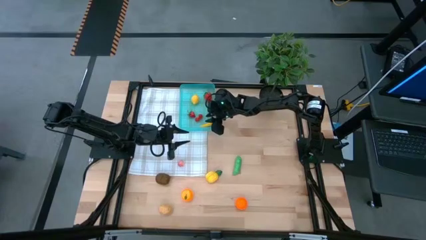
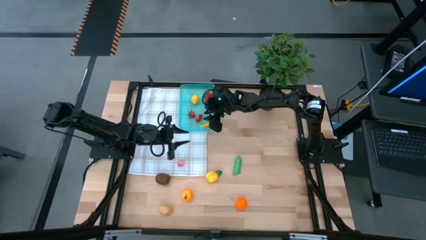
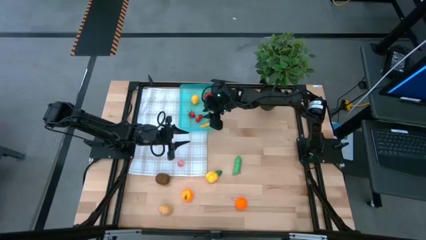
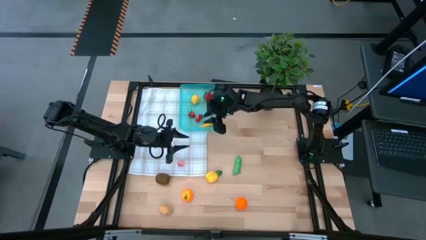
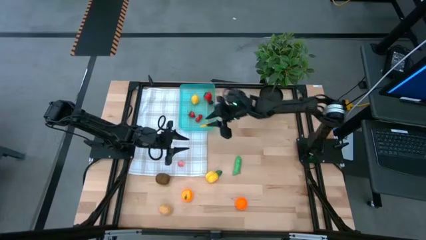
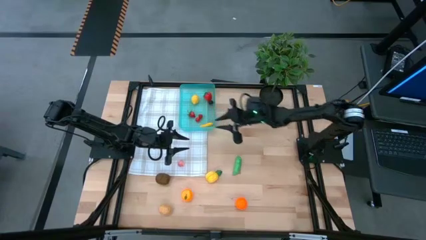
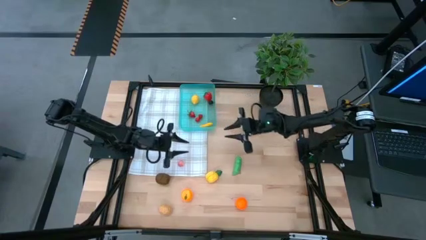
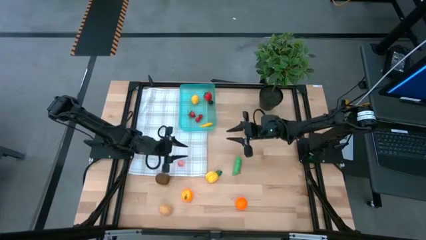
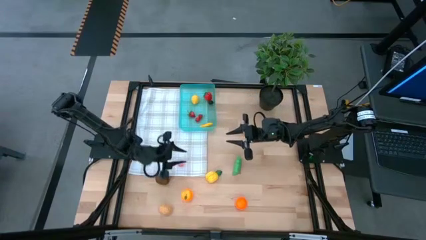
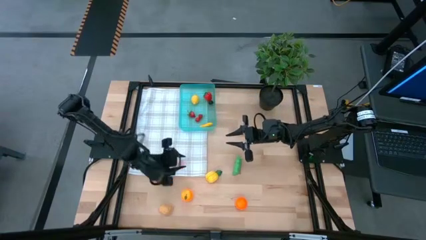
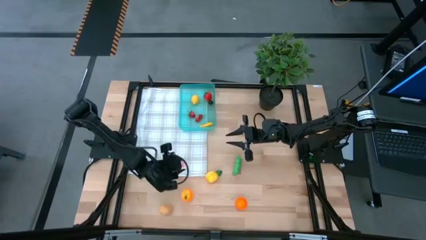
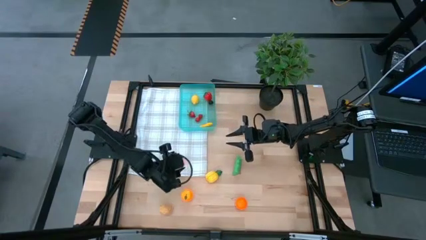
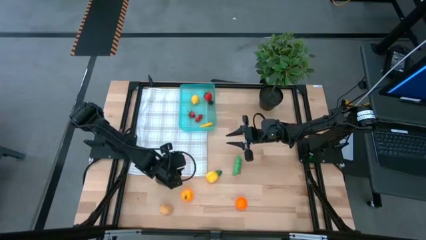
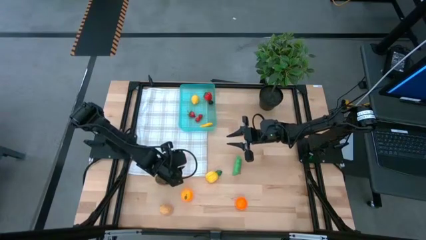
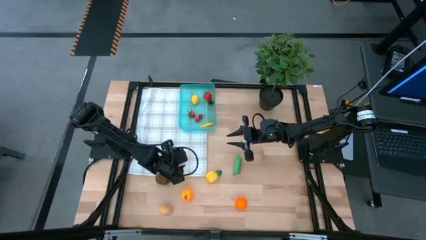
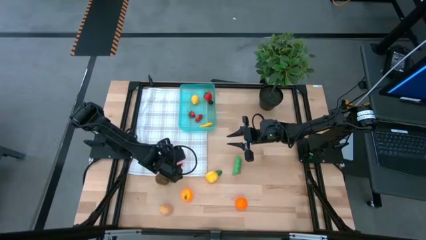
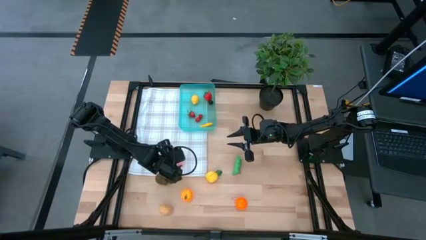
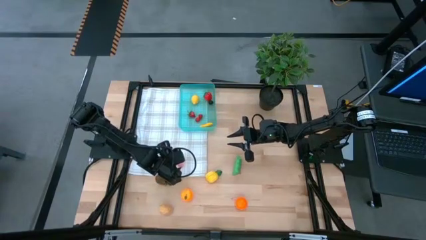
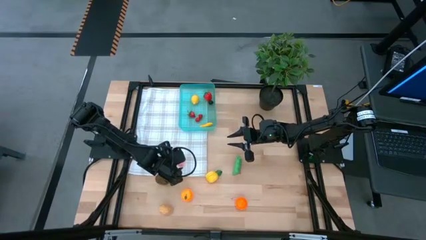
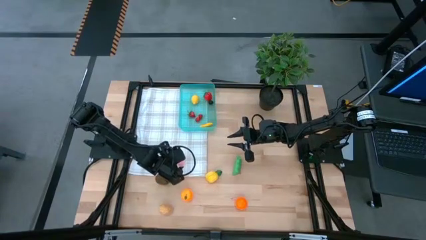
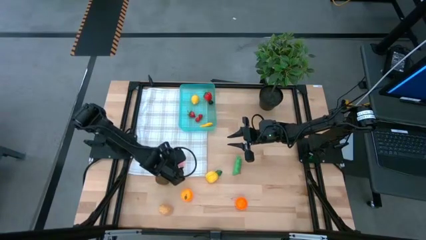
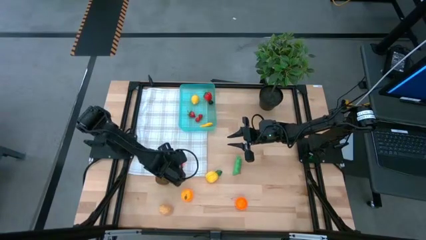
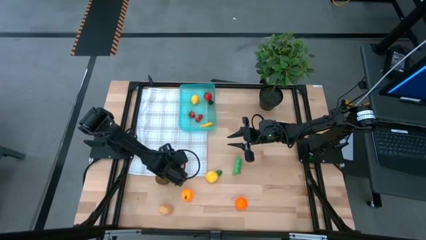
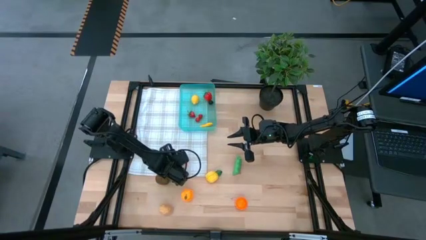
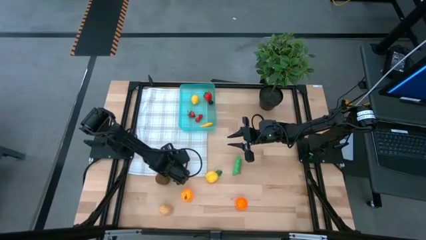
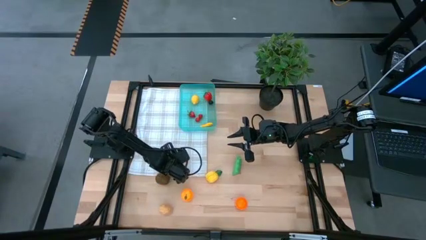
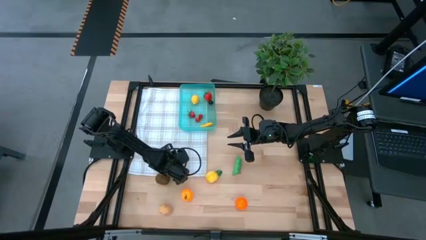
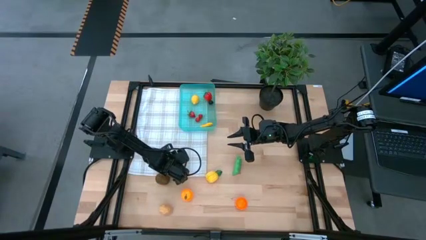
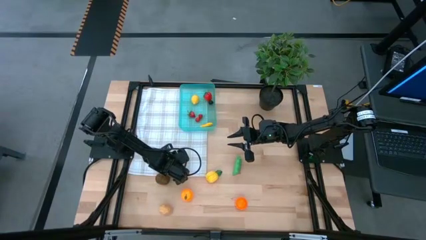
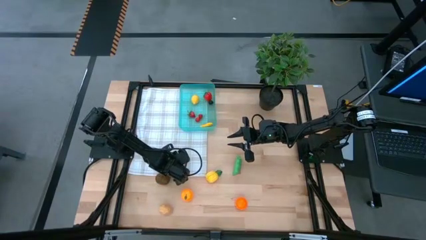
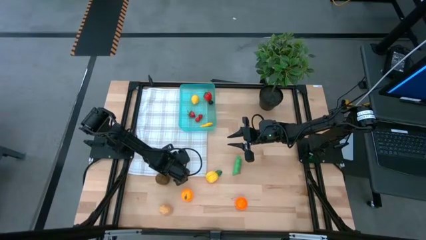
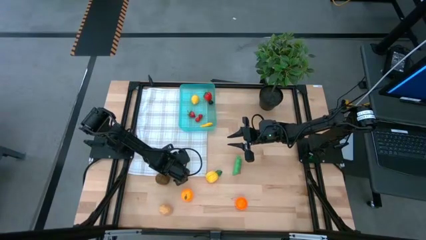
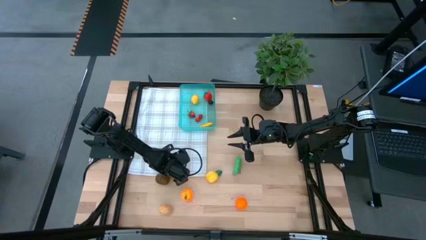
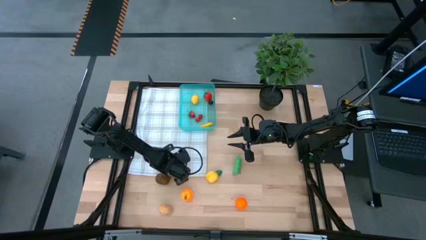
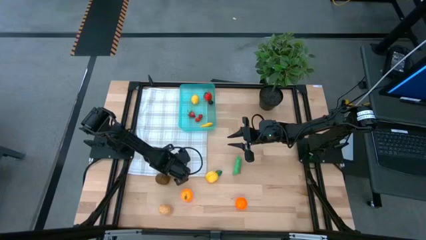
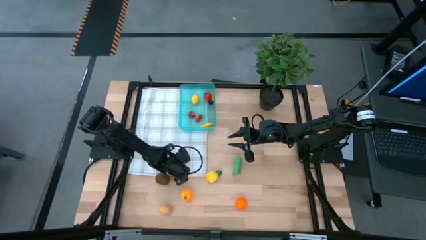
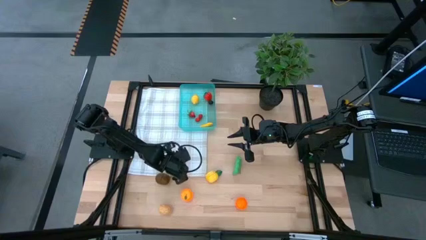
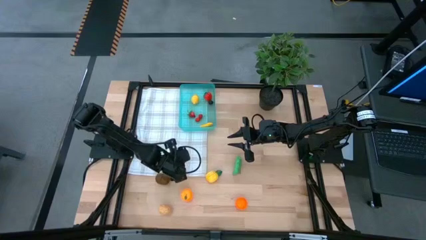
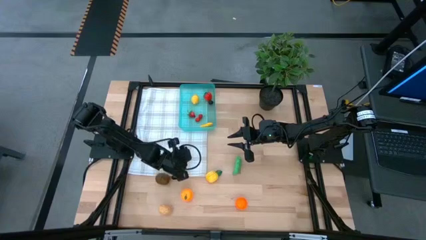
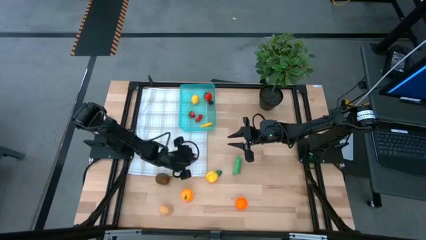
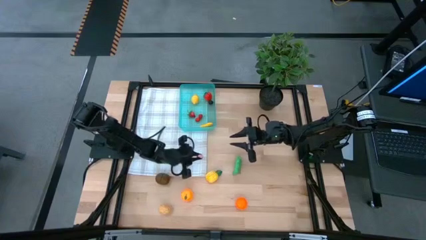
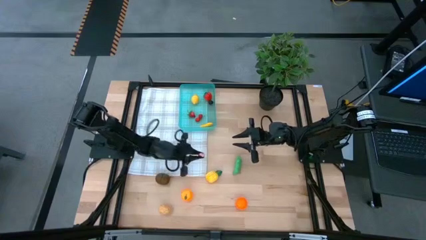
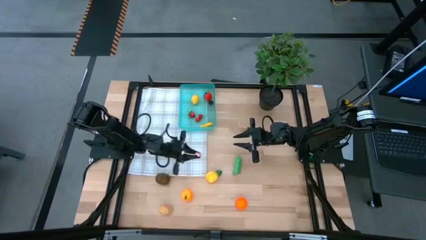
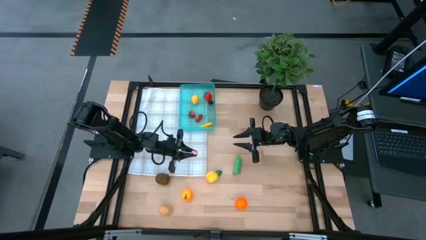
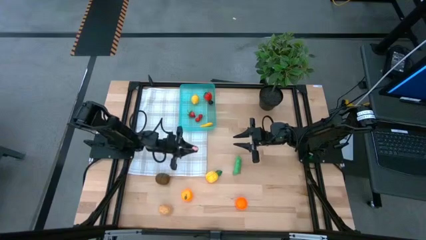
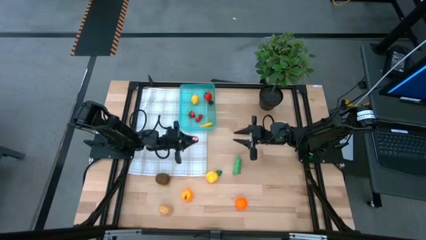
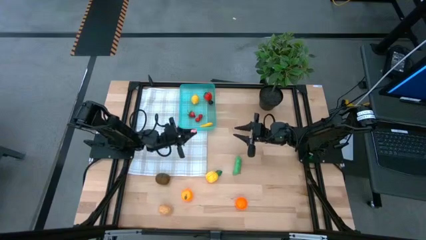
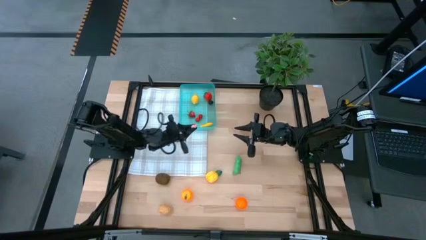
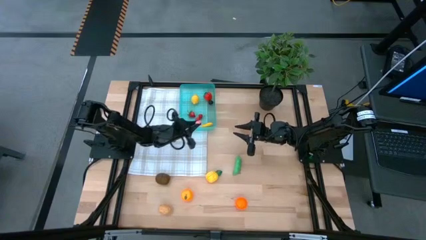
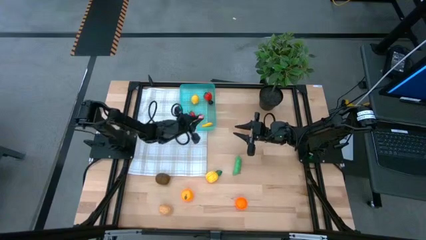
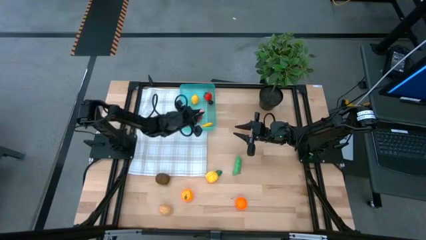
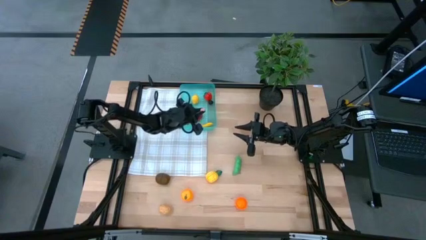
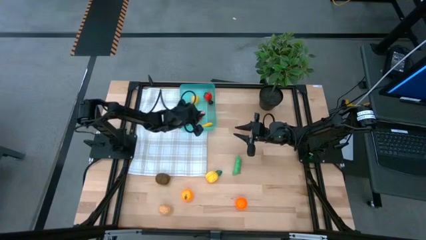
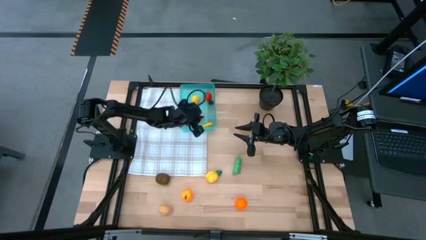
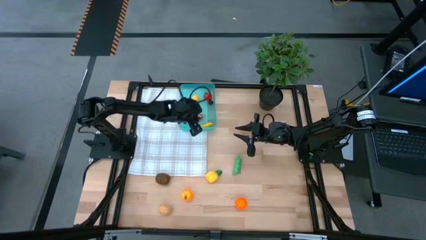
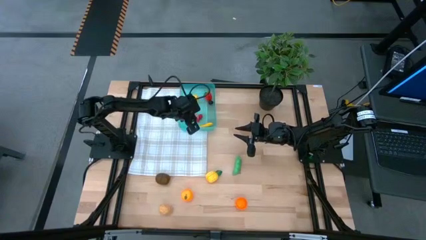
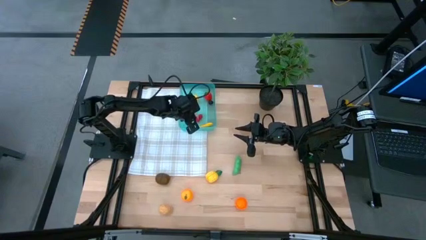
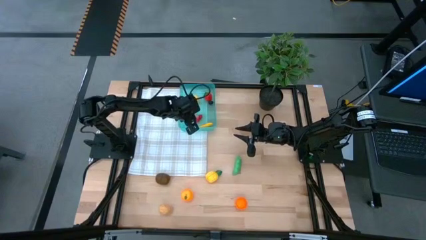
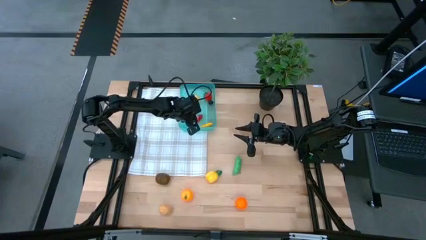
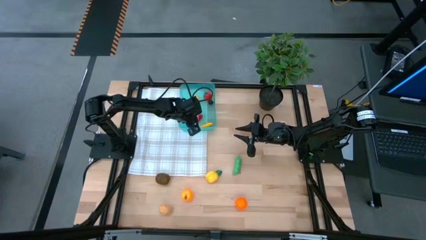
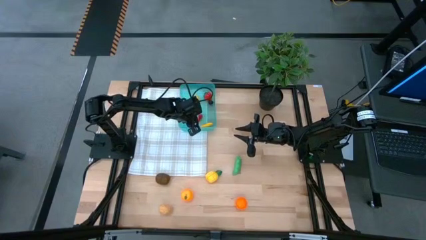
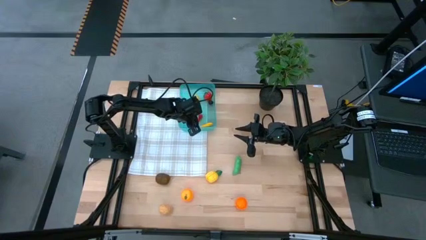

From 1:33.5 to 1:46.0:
Task: Pick and placing Produce into tupperware
Put the pink peach into the blue bin

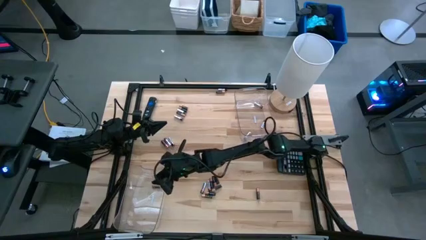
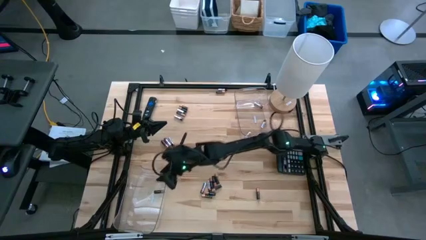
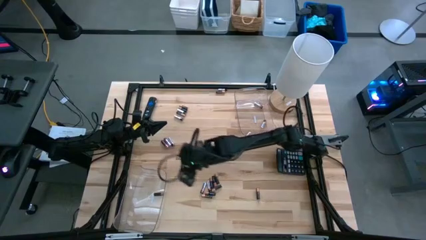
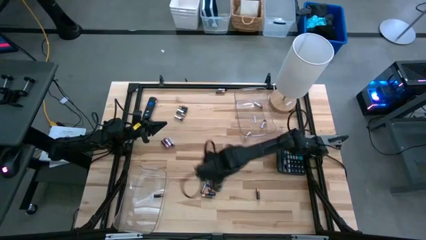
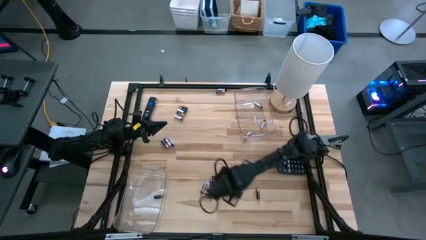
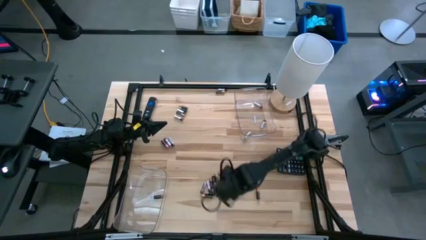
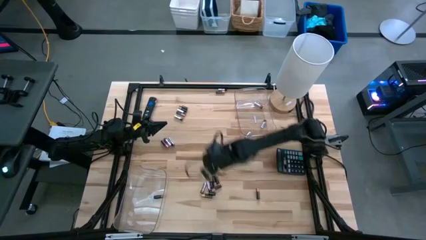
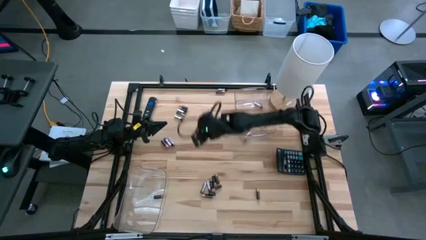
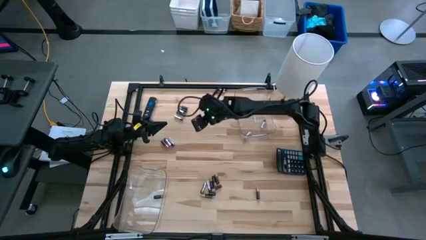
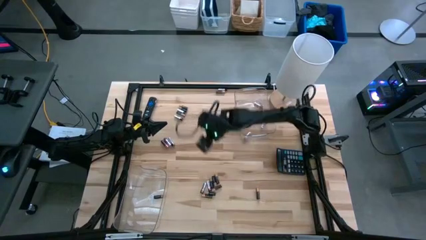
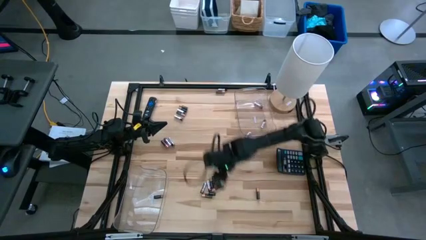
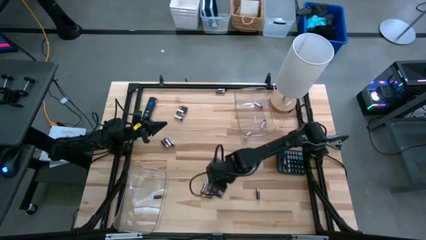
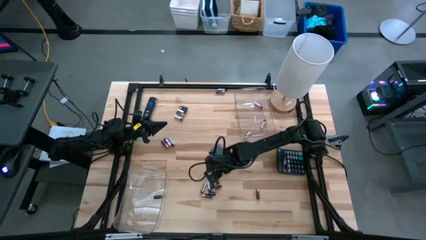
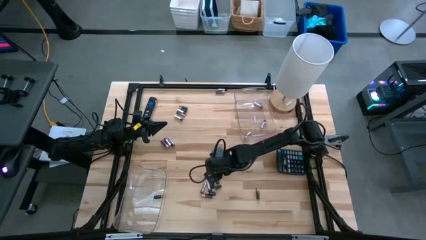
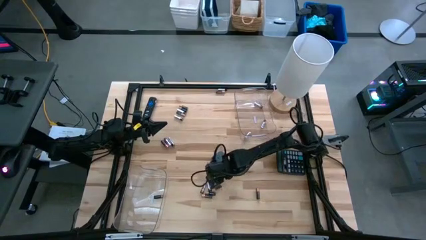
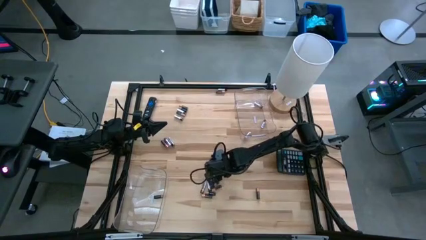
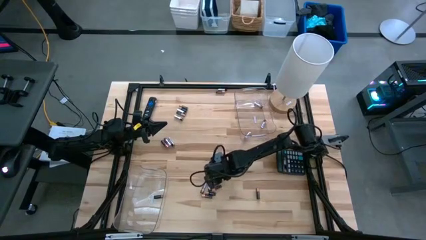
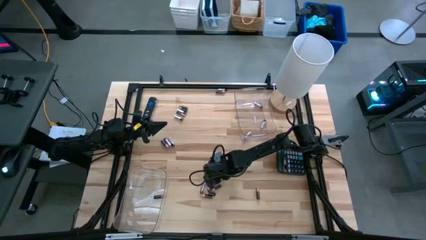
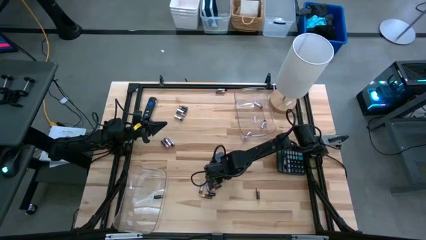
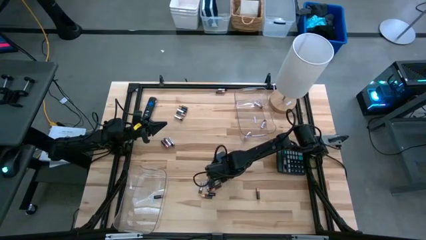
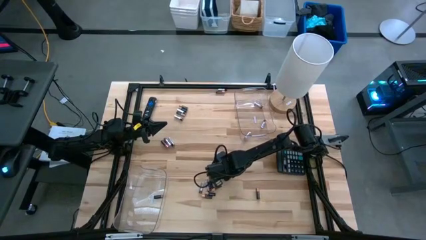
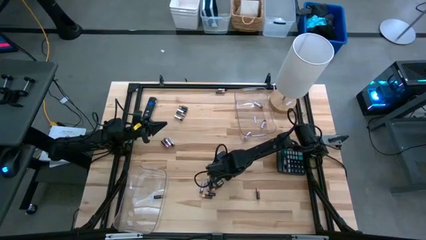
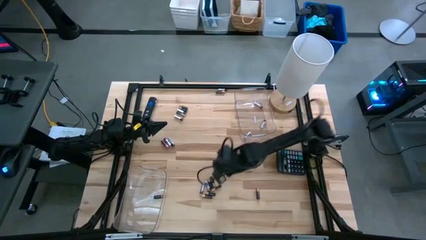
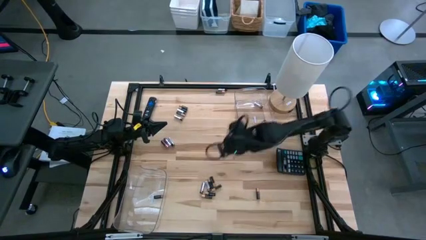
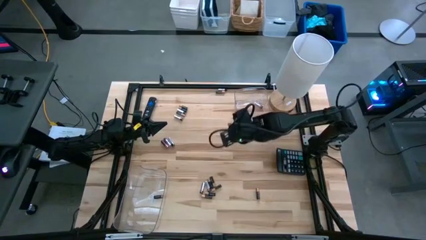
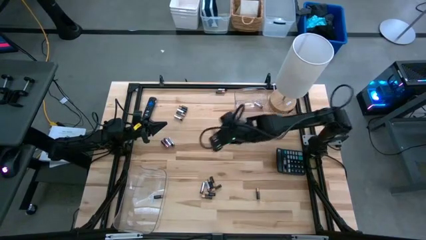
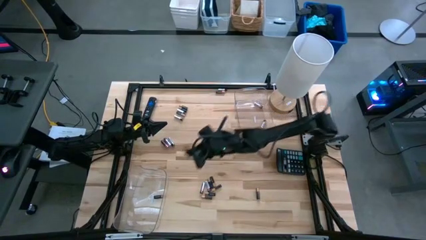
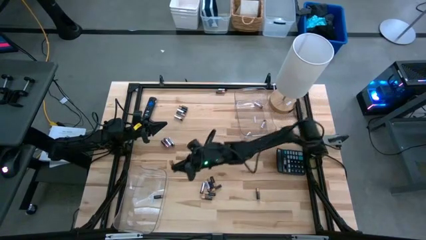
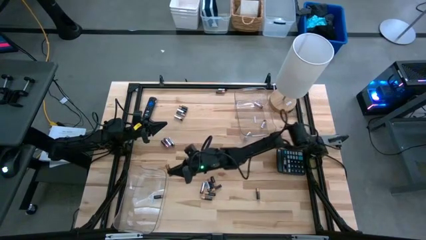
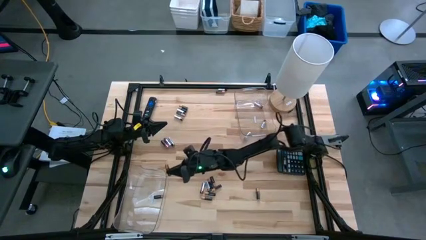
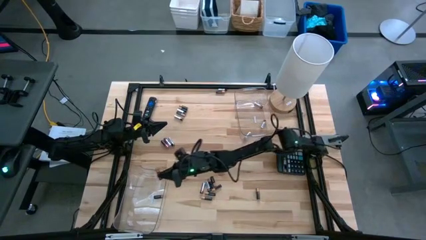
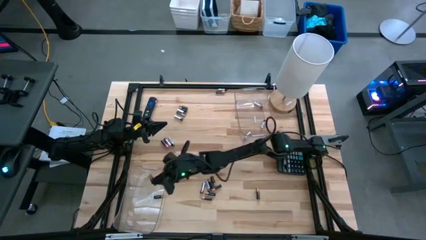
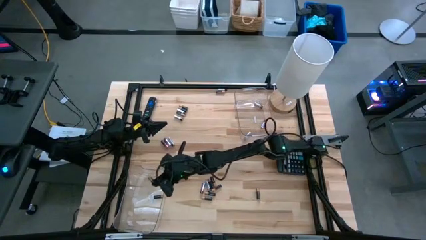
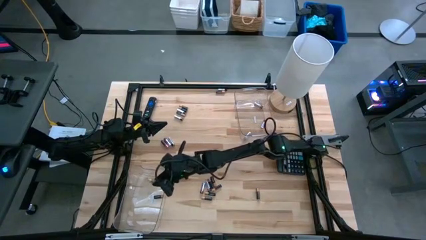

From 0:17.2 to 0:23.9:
Task: Sort batteries
Put the brown battery into the left transparent bin
